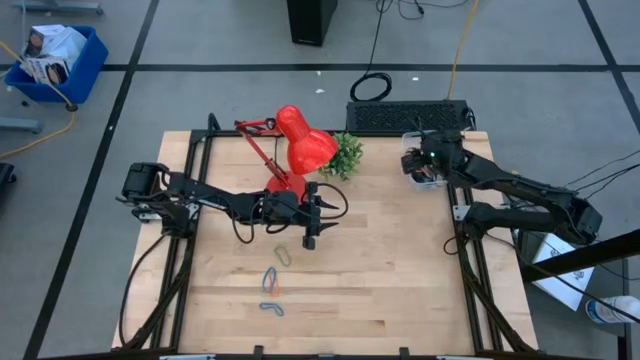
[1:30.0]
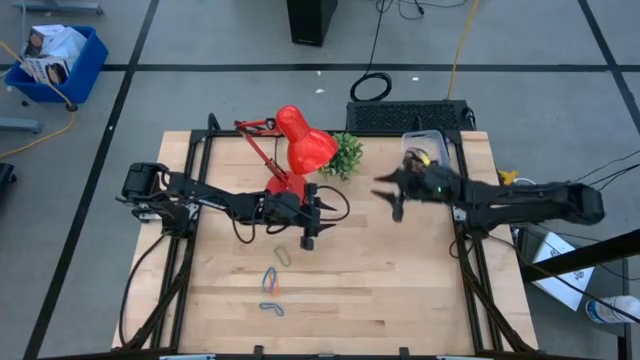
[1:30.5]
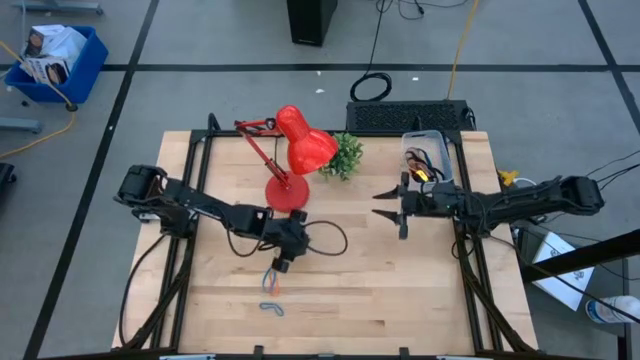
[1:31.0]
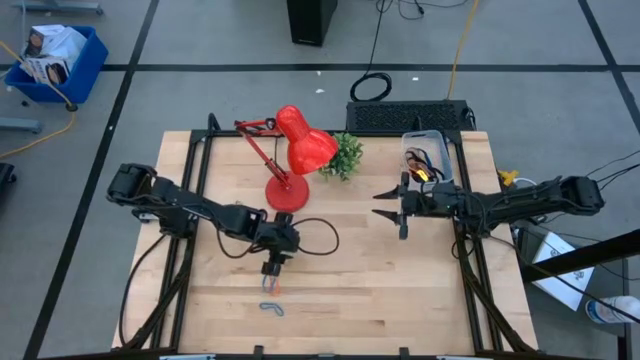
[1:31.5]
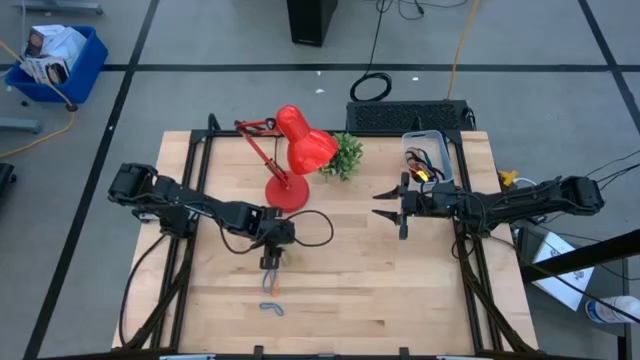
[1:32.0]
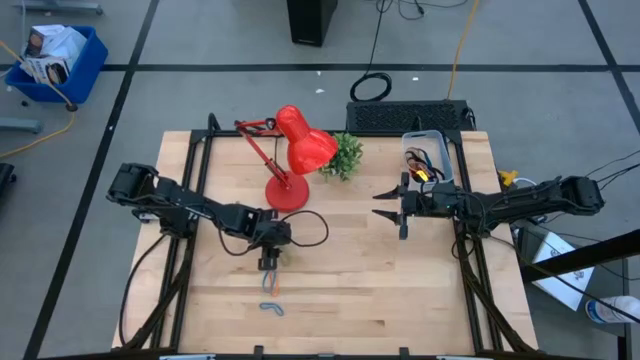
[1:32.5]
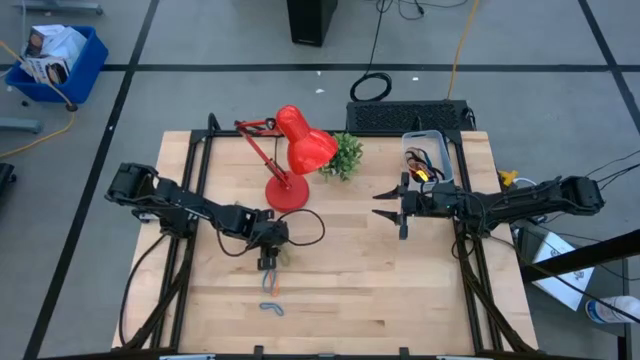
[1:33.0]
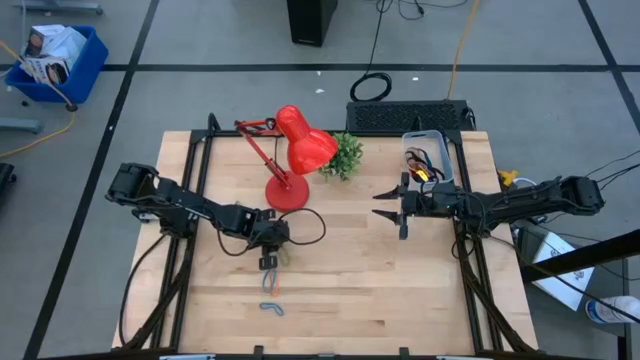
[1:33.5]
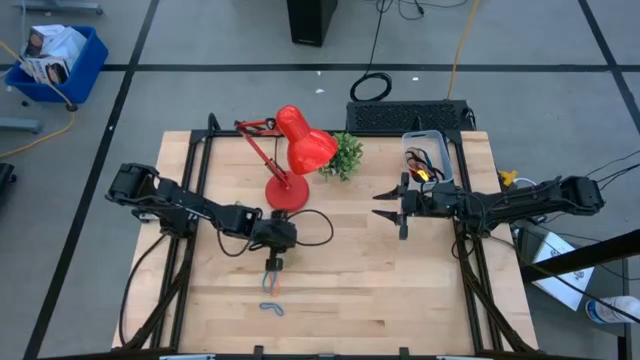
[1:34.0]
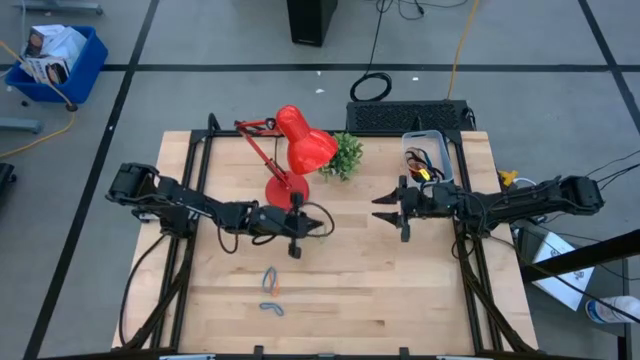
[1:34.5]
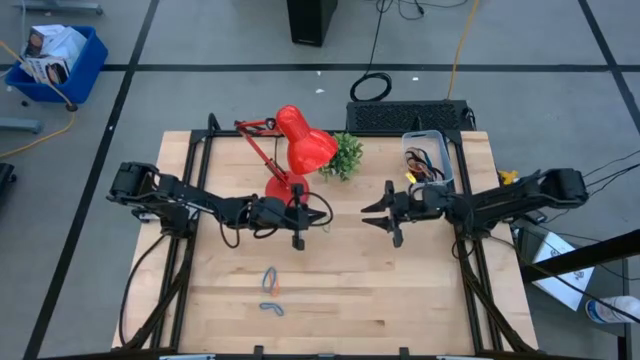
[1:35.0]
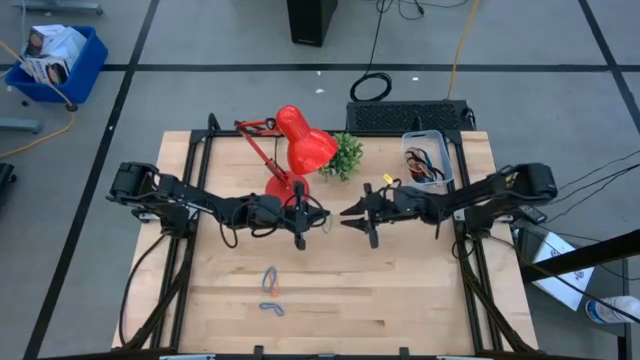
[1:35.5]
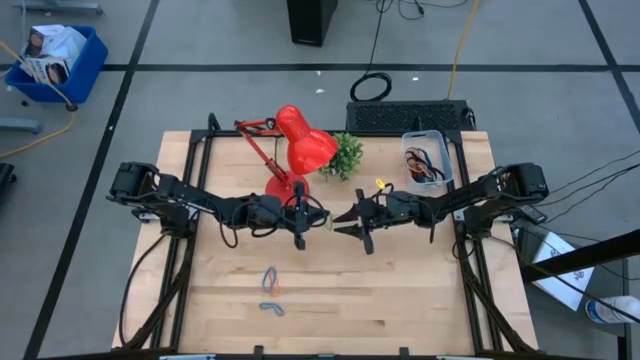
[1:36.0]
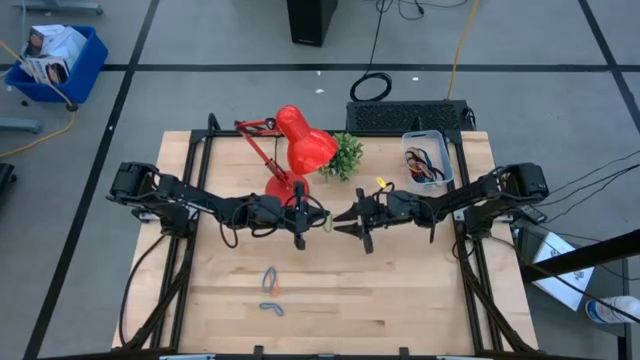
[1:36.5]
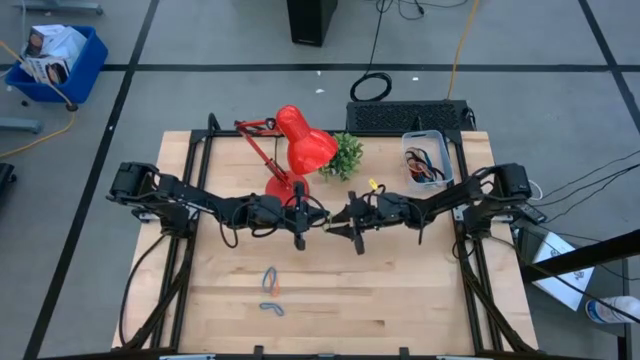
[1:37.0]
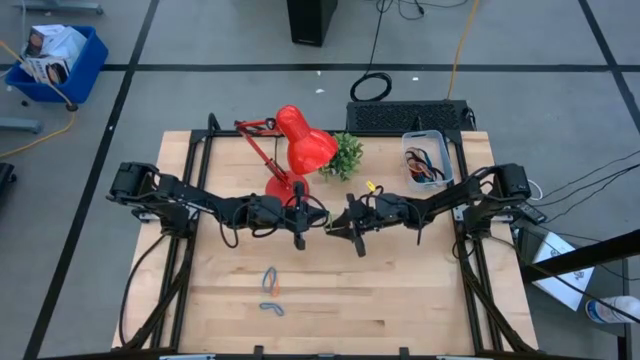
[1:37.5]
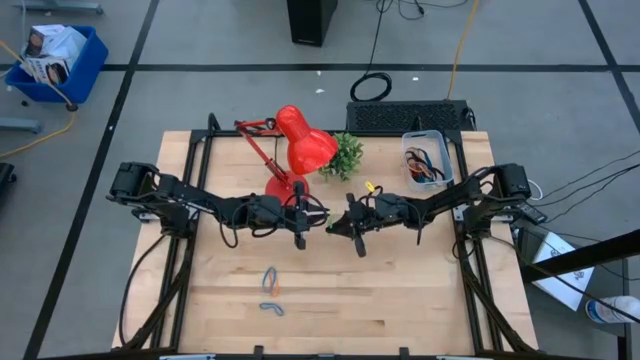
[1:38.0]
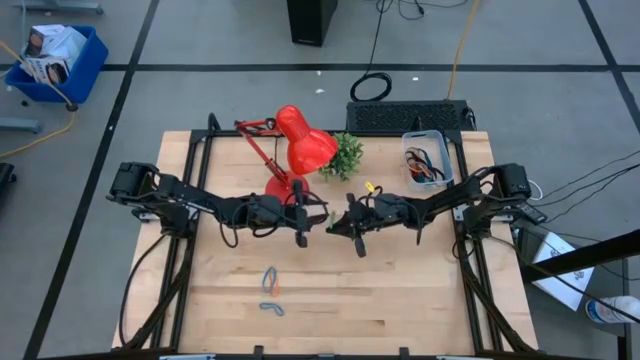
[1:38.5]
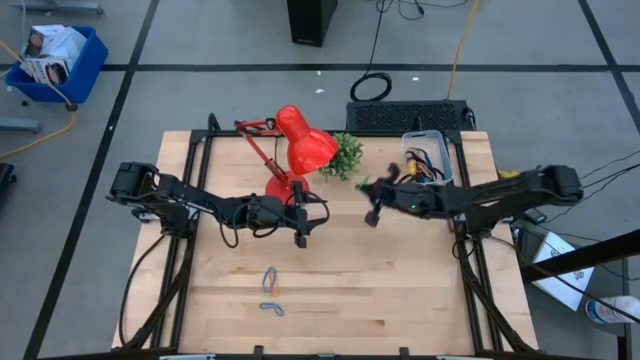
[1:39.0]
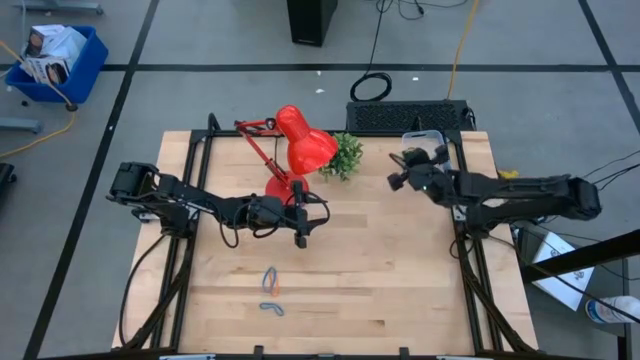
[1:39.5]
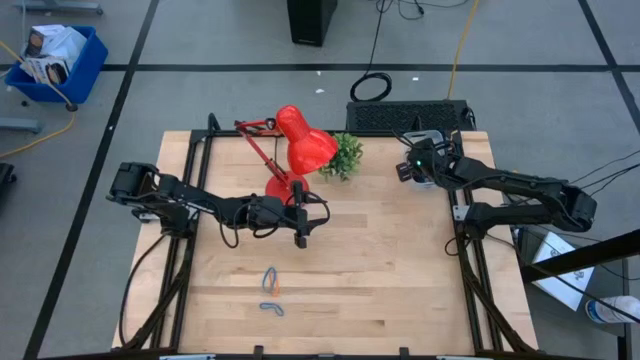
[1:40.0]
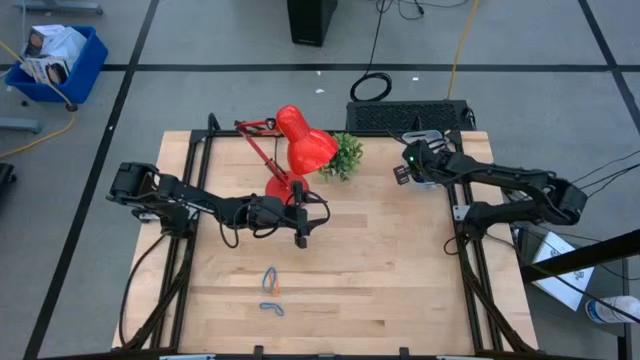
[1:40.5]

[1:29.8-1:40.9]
Task: Pick and place rubber bands into bin
Put the bottom green rubber band into the transparent bin

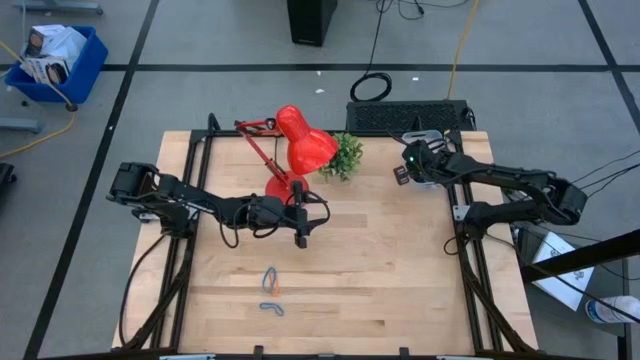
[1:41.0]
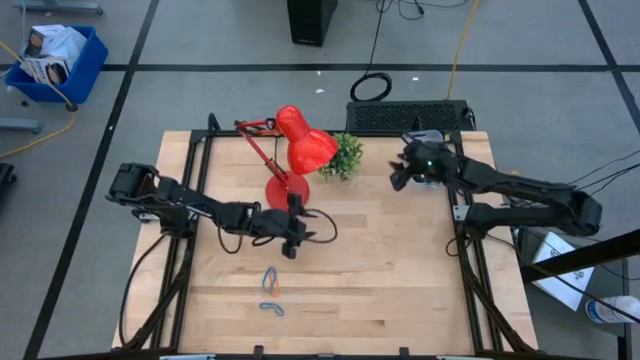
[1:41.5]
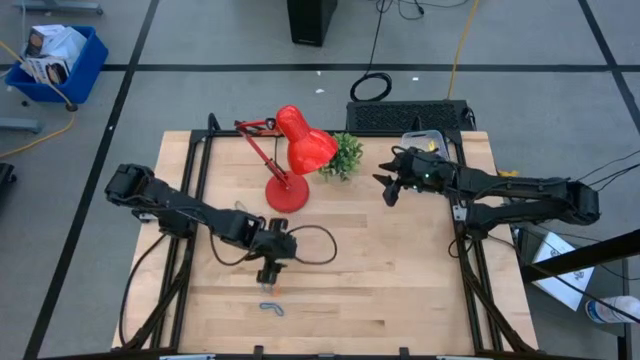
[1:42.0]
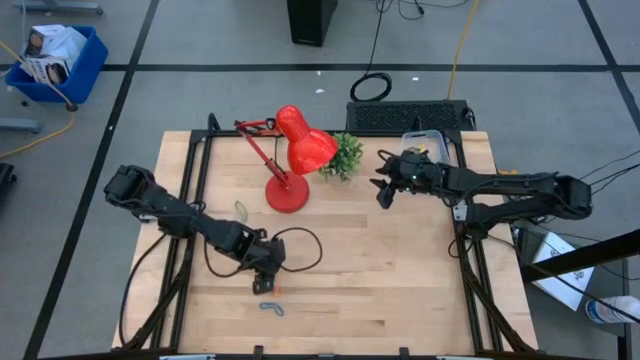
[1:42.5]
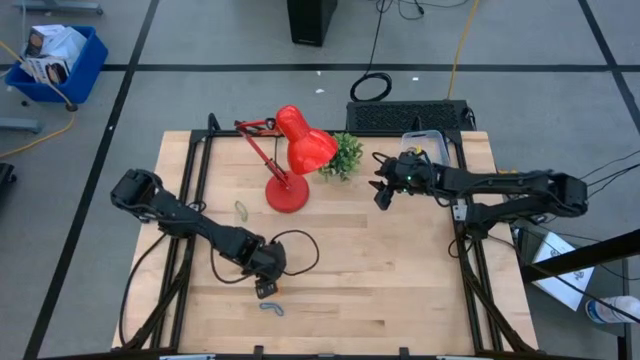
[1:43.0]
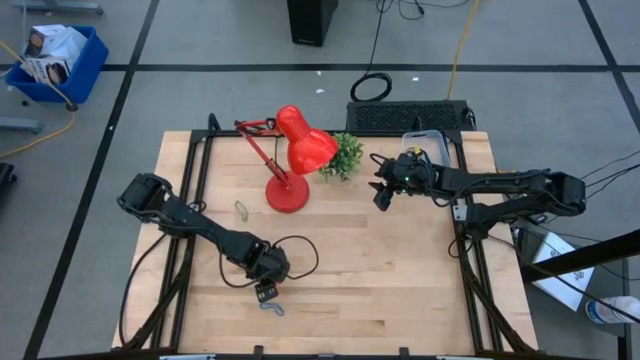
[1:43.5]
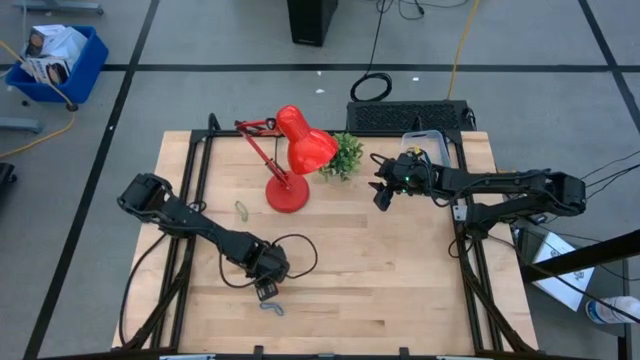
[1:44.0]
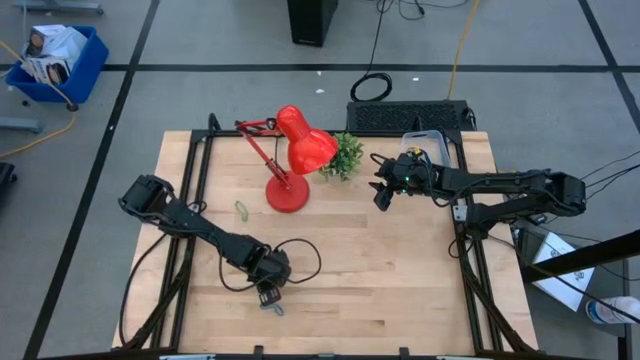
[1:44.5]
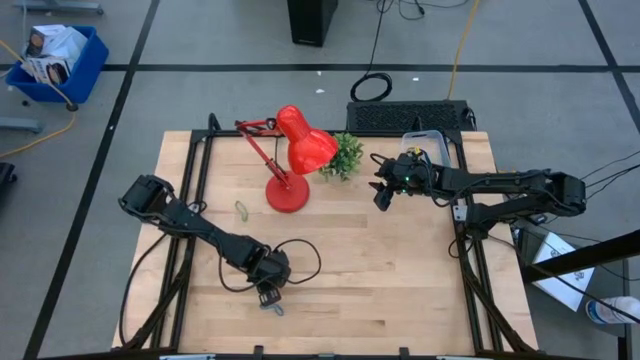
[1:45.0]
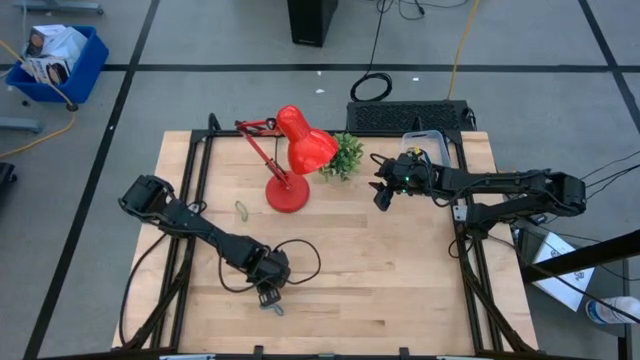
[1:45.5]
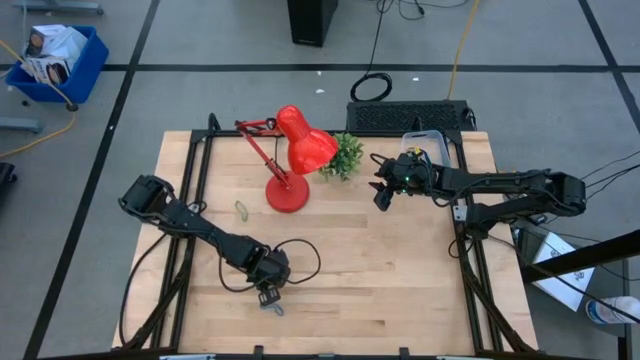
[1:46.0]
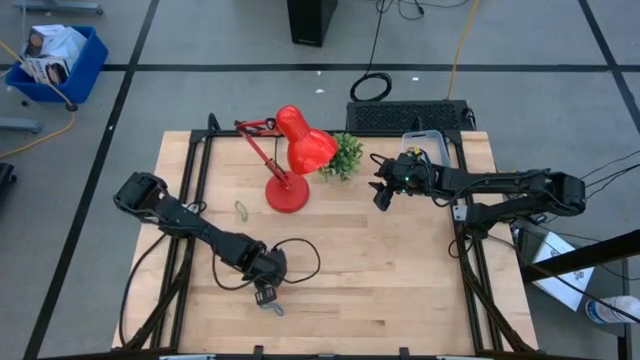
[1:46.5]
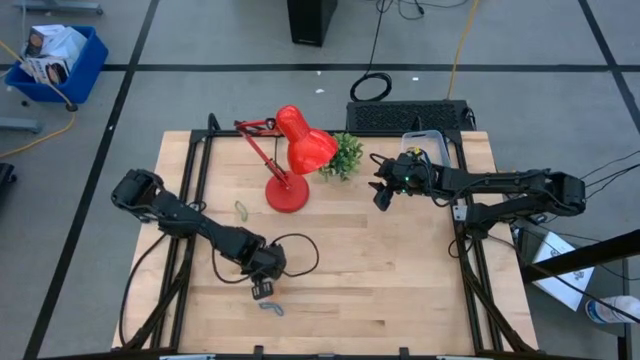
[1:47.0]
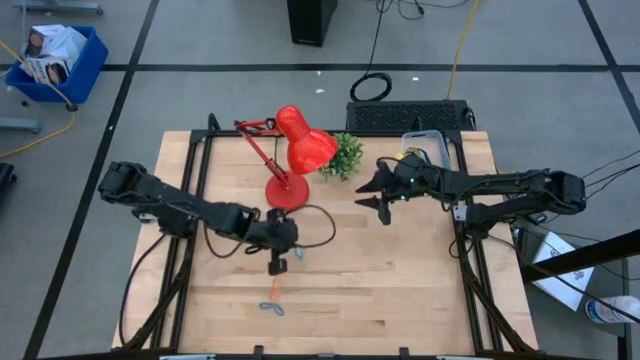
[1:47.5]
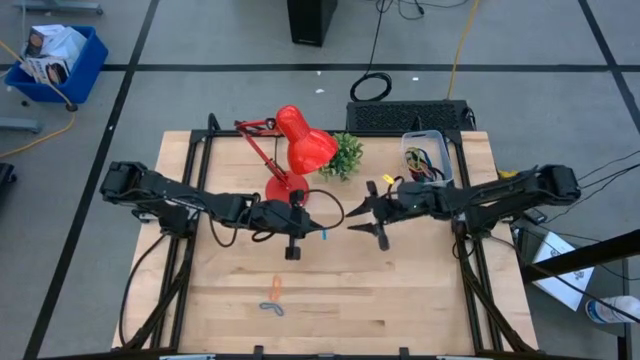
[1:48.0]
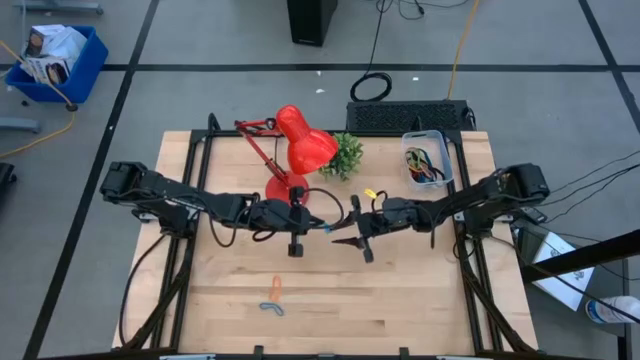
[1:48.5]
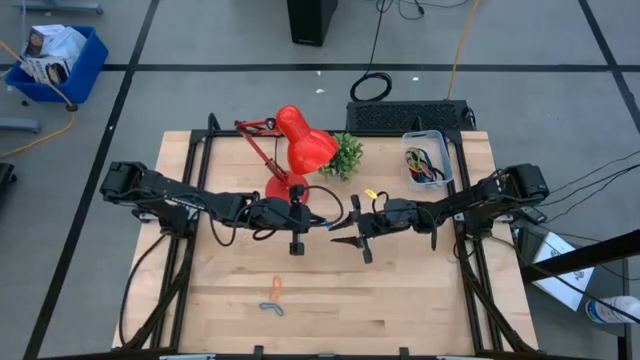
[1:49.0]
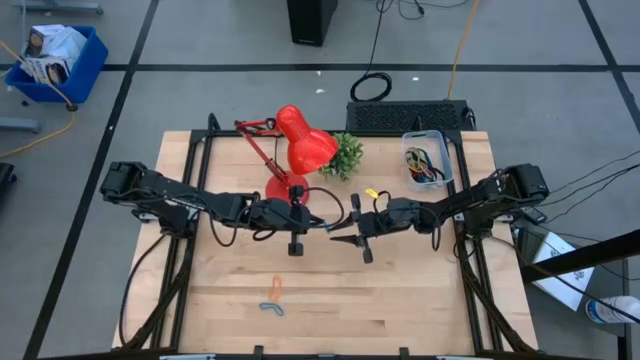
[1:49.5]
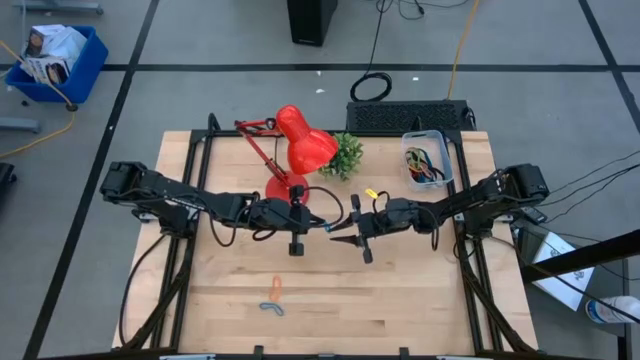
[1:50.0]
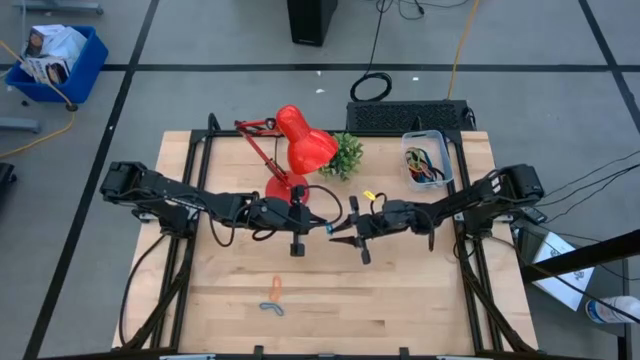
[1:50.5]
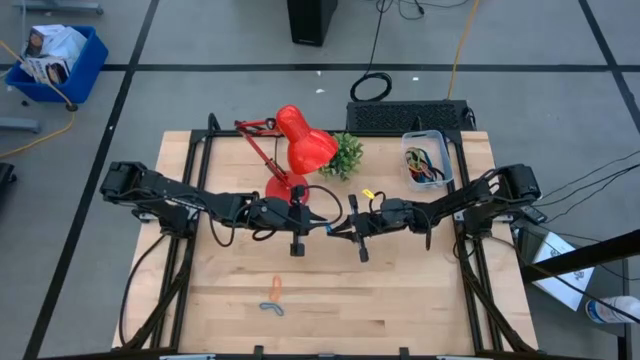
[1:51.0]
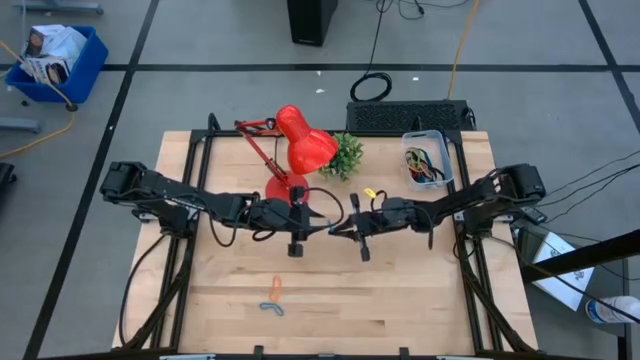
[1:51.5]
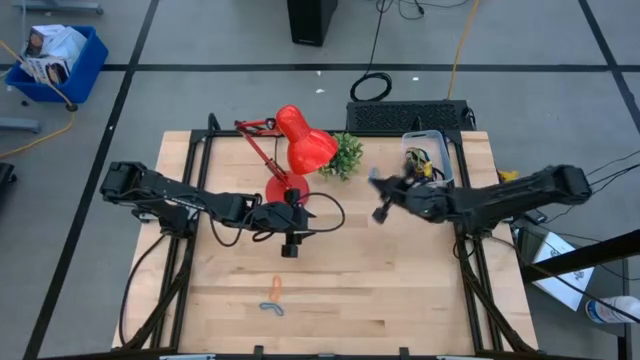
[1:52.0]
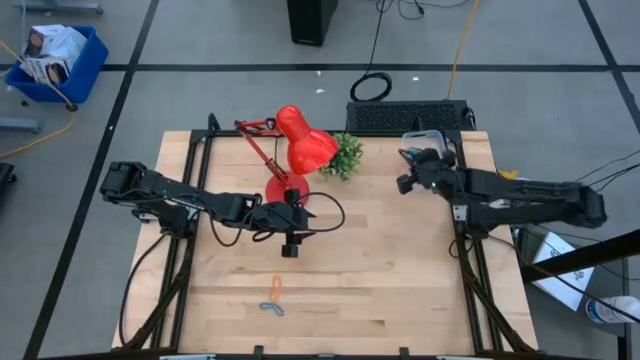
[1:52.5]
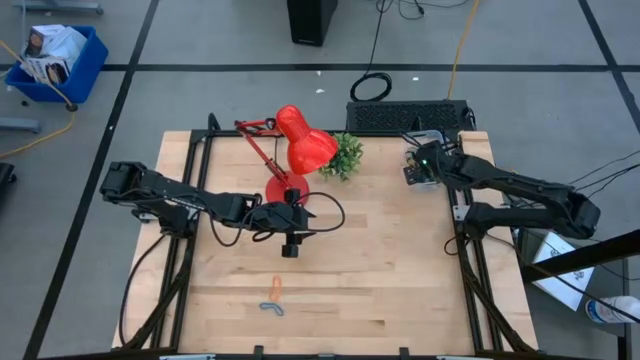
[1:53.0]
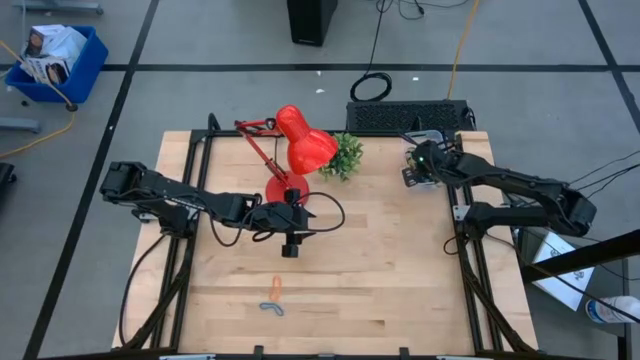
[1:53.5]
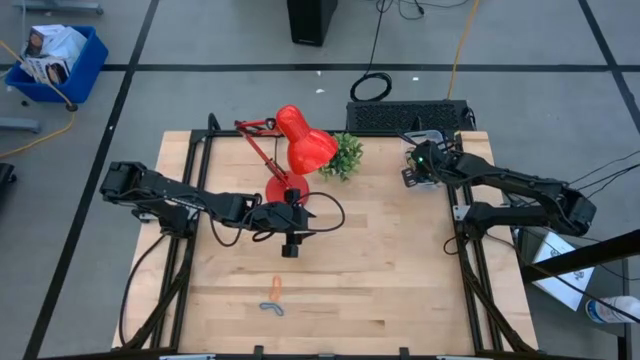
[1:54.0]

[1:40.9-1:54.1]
Put the top blue rubber band into the transparent bin
